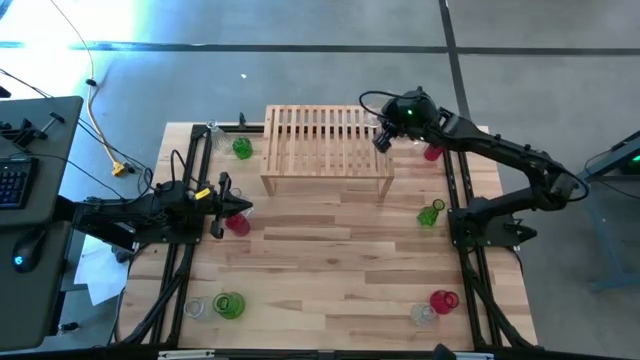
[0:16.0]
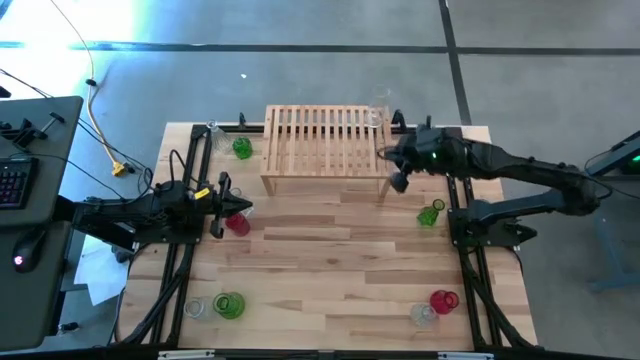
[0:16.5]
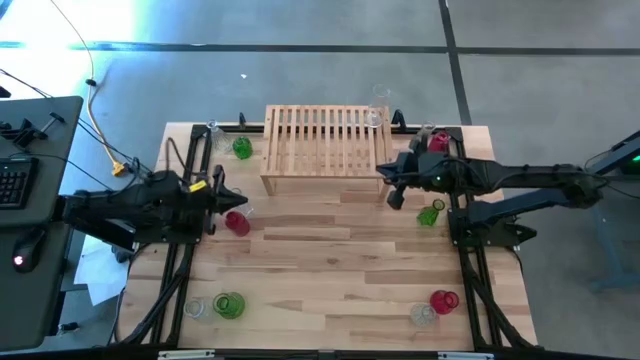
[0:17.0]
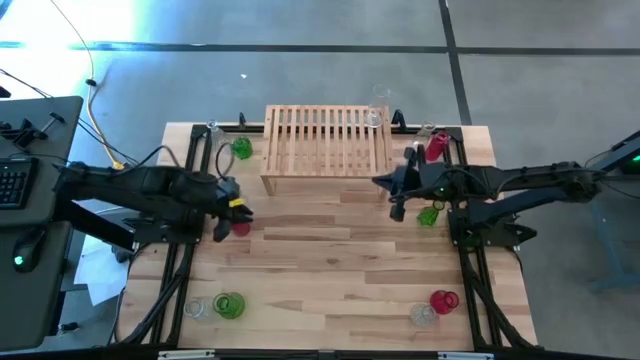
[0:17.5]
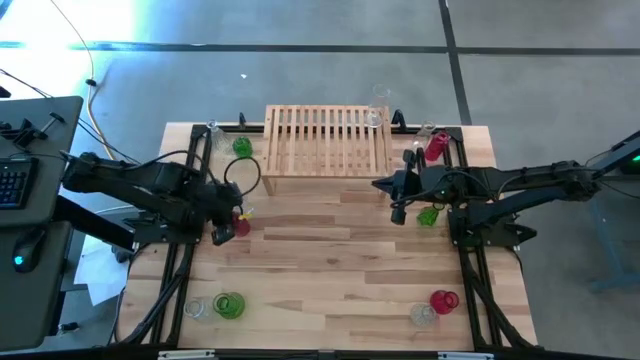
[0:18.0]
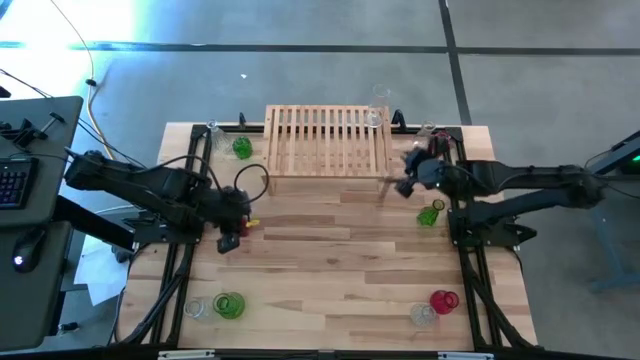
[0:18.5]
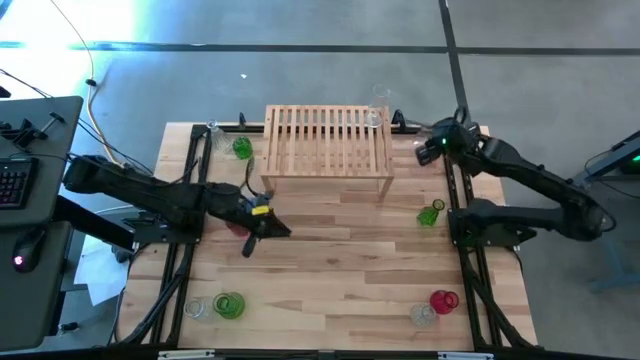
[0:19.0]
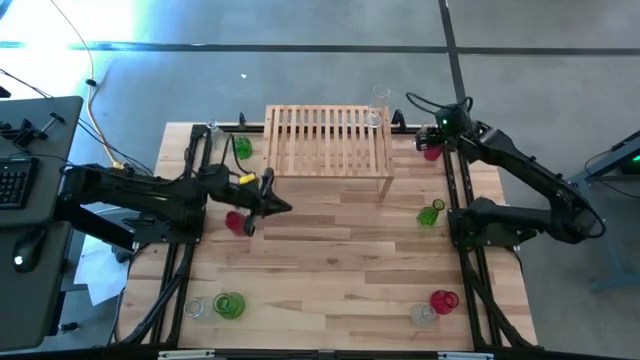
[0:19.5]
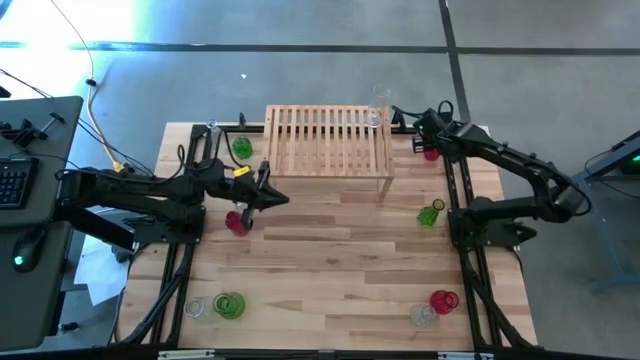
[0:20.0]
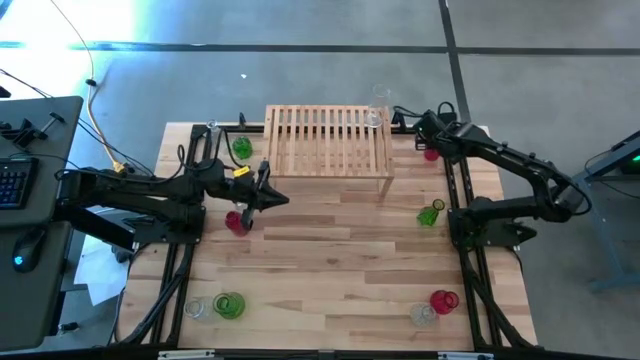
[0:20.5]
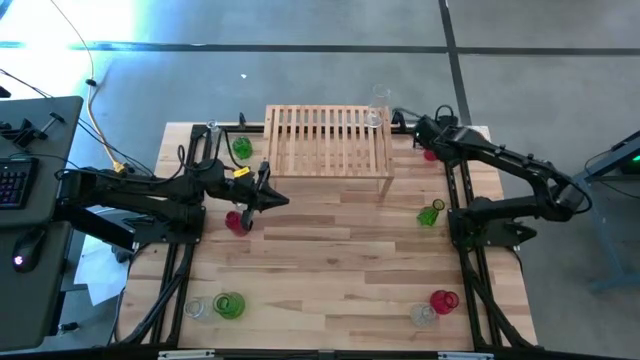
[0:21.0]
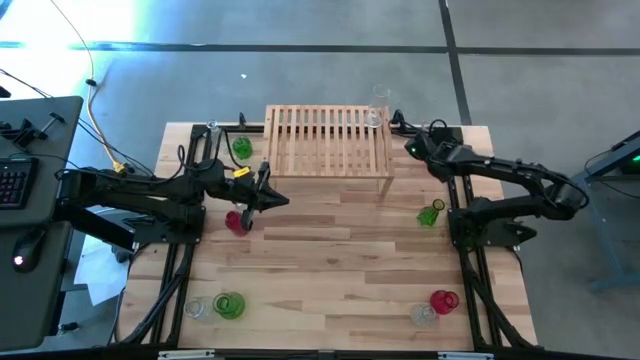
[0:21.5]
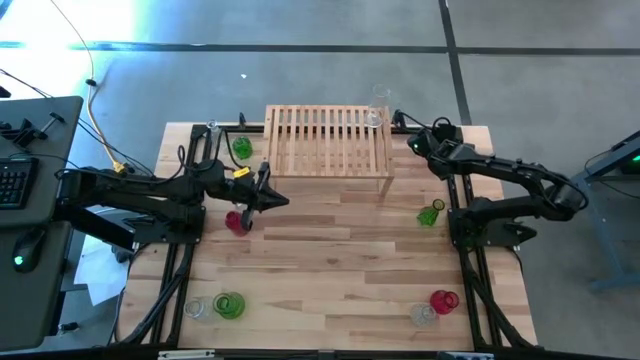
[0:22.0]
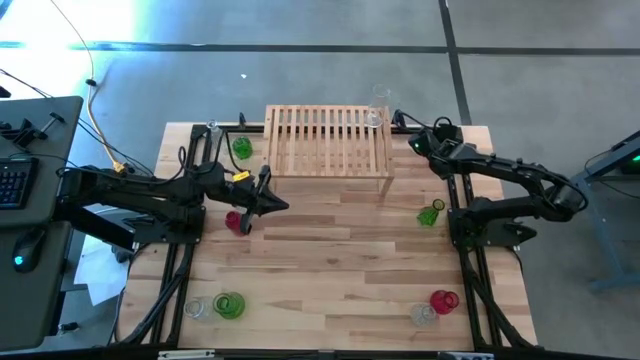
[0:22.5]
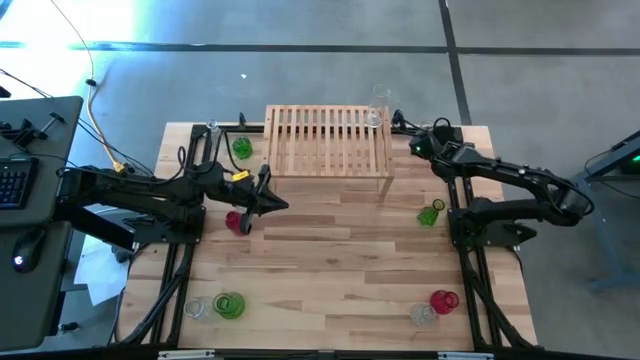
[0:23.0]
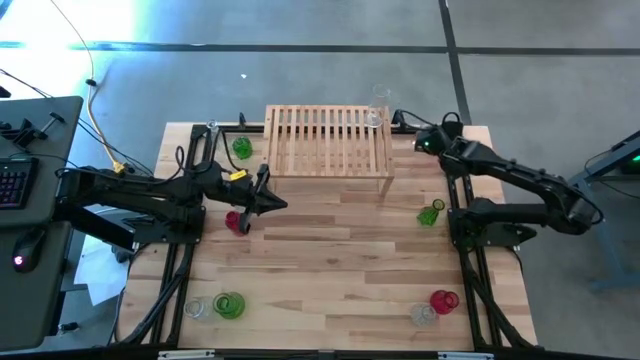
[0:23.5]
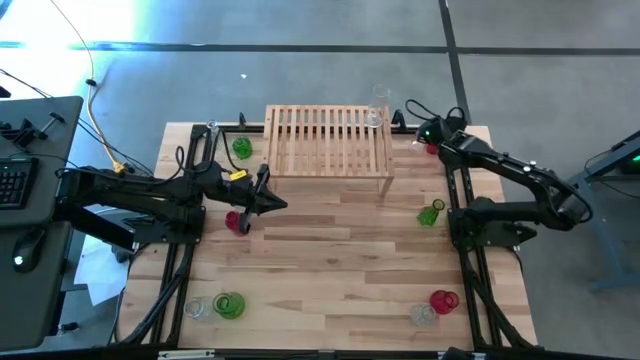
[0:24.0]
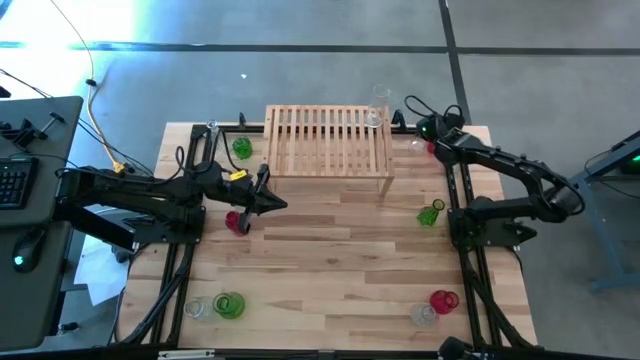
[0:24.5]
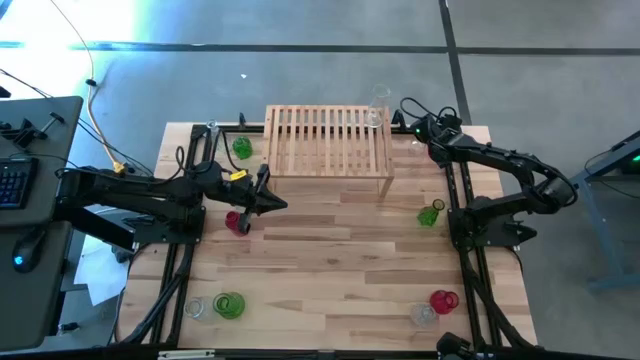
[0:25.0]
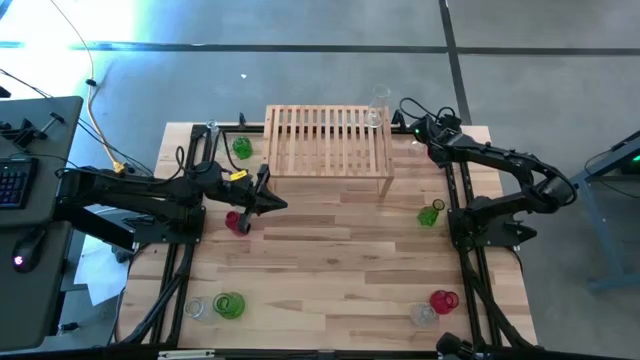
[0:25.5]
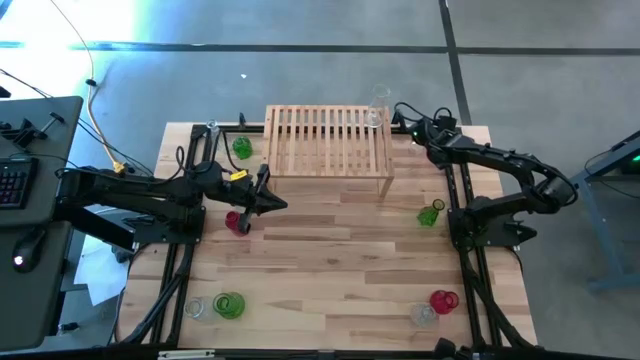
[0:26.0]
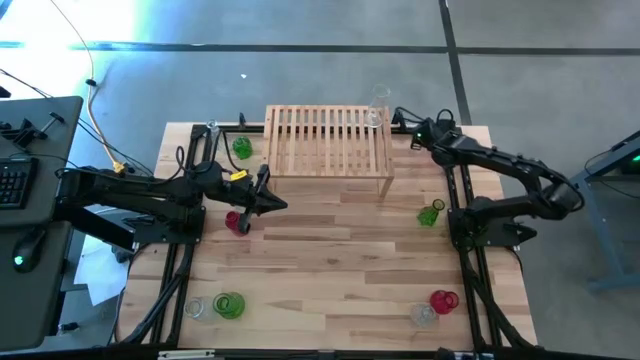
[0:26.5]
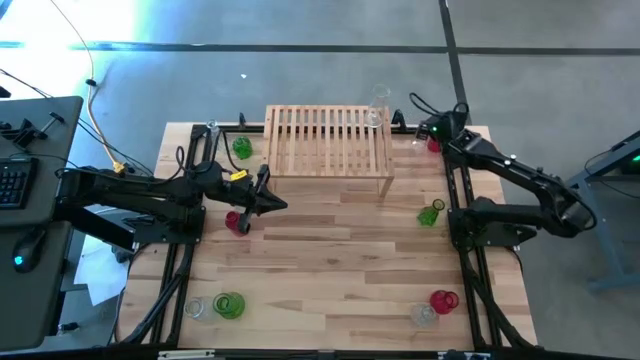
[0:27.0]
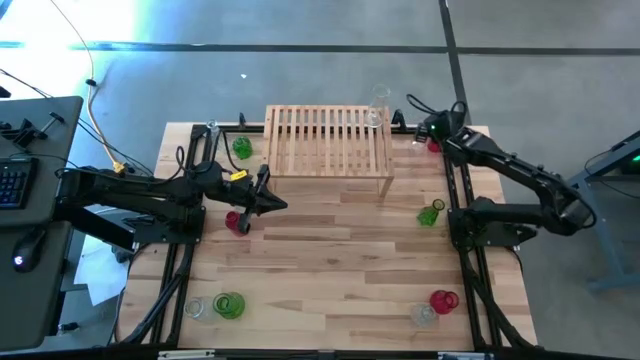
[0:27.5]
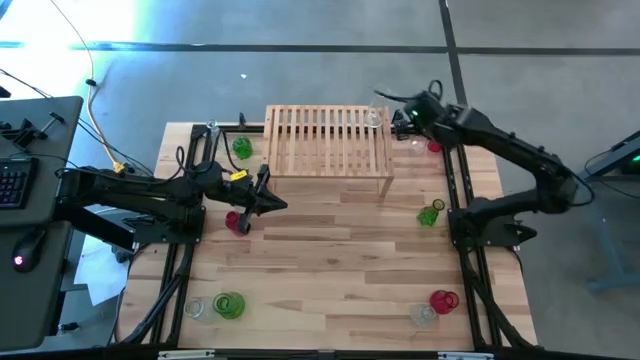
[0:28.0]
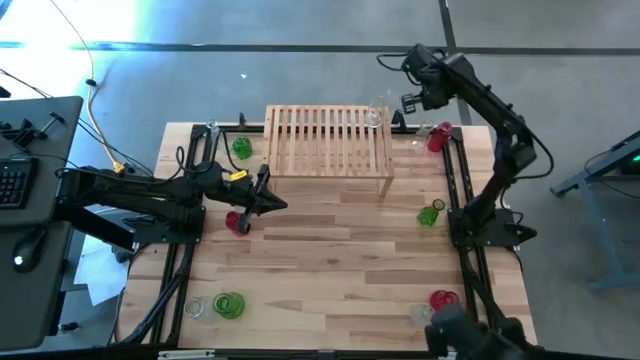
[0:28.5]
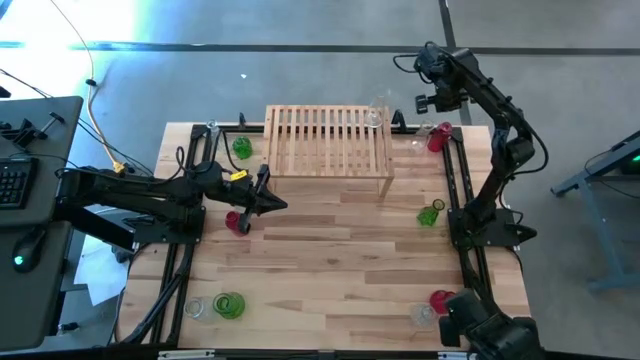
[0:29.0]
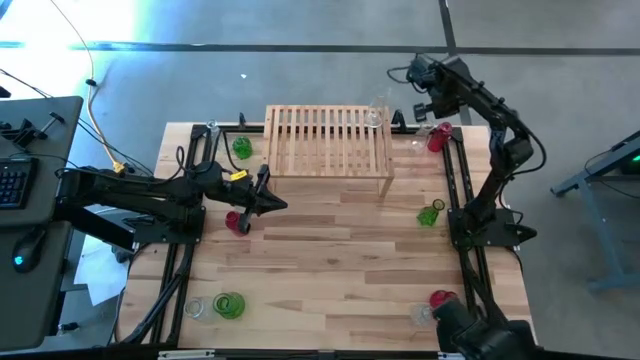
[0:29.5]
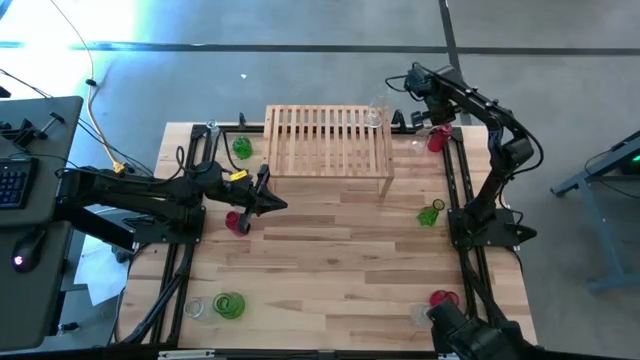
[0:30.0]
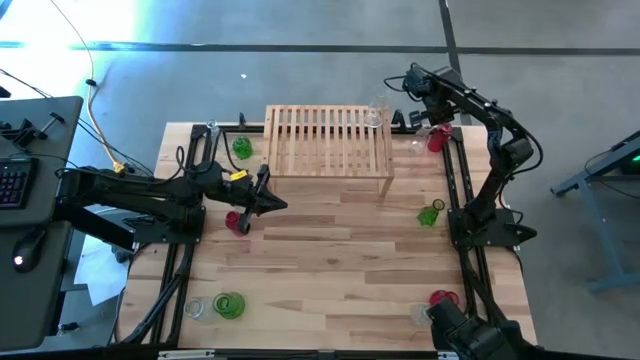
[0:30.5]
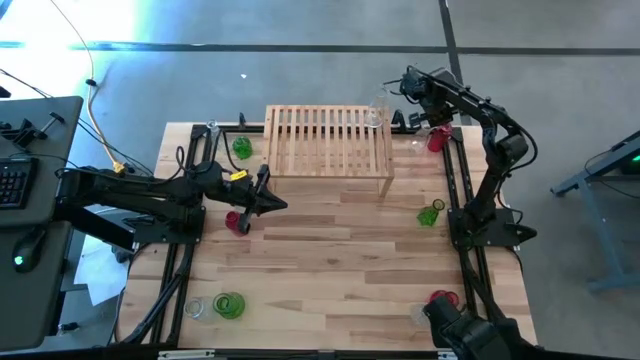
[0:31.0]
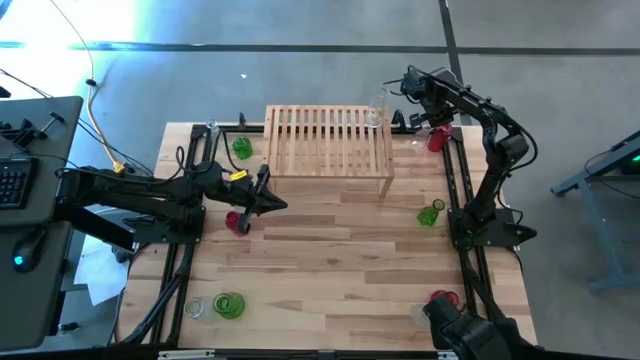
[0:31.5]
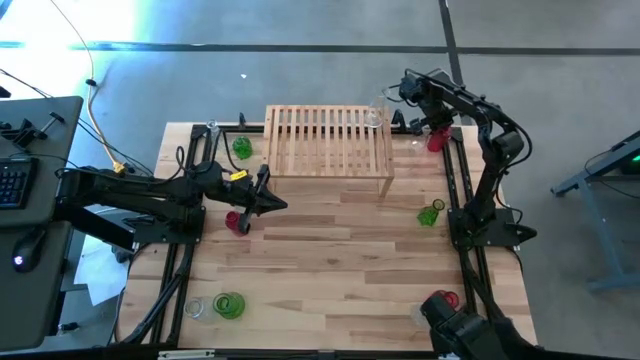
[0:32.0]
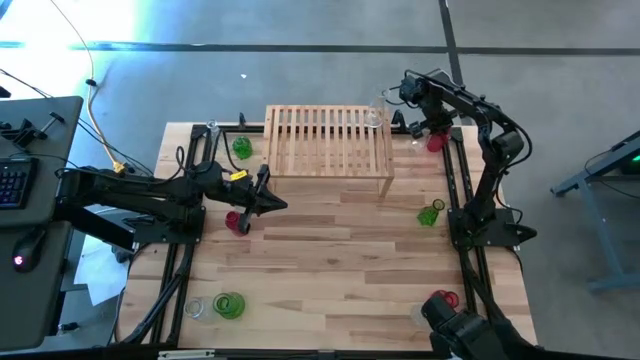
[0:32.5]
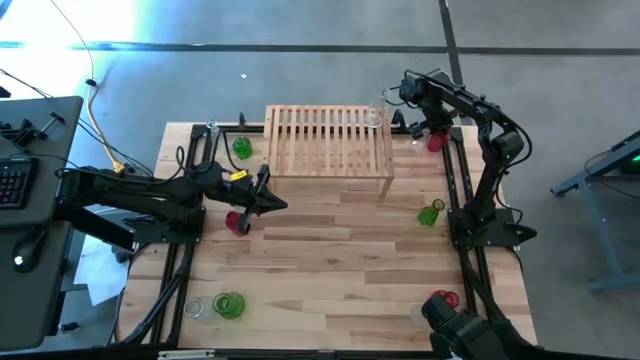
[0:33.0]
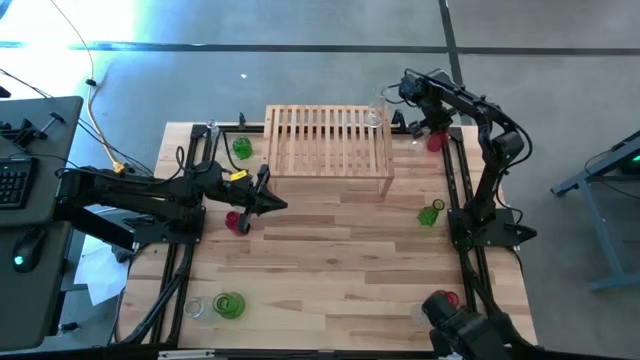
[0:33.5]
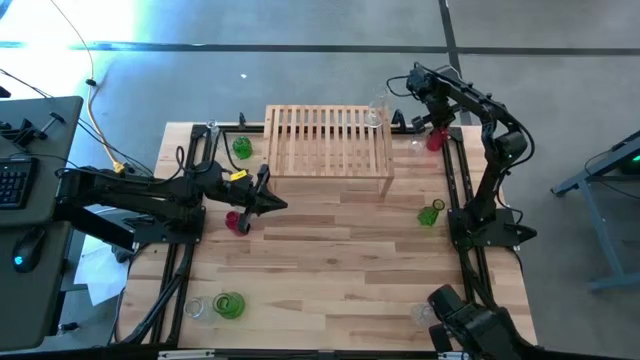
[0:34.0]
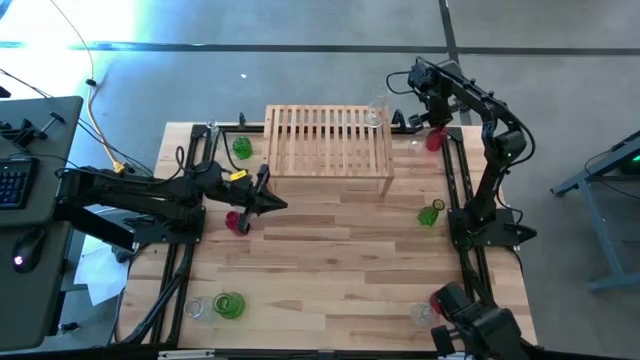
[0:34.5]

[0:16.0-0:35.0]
Task: sort vases onto shelf
Put the red vase on the shelf

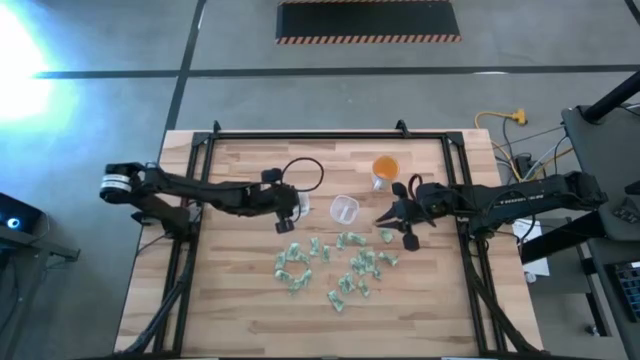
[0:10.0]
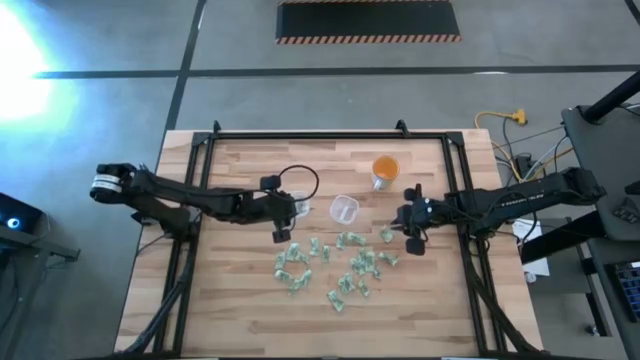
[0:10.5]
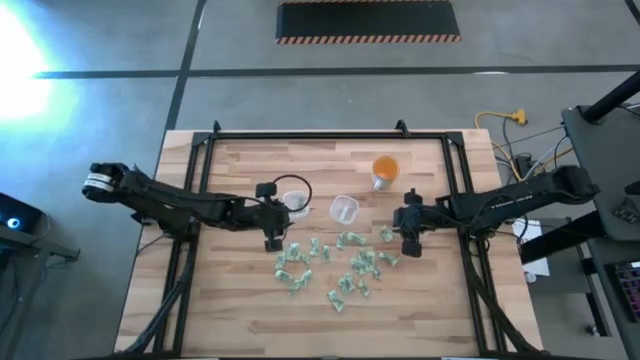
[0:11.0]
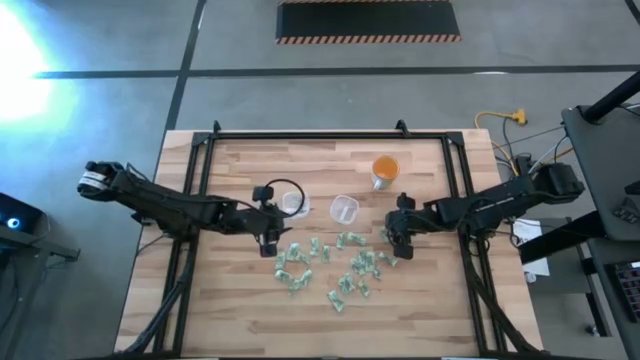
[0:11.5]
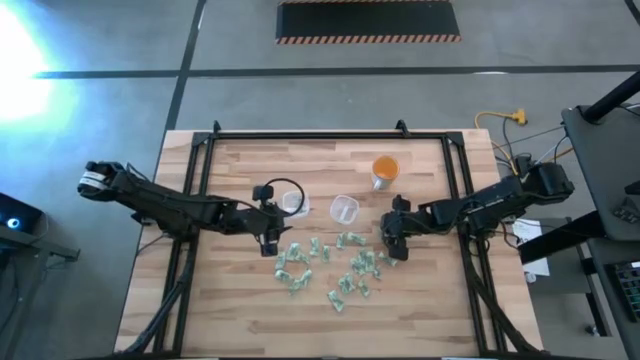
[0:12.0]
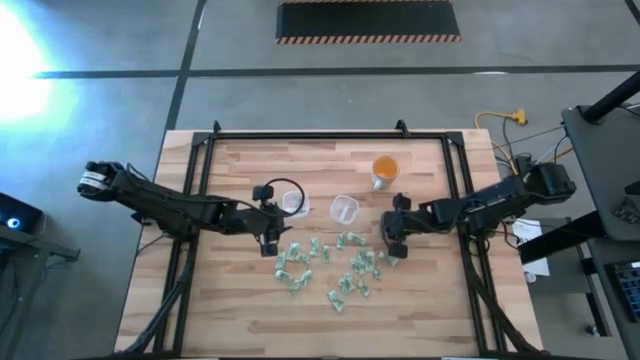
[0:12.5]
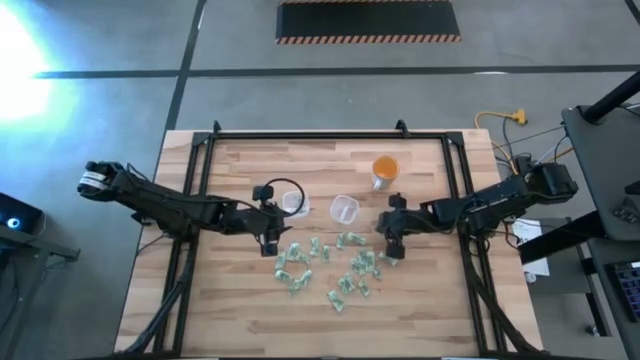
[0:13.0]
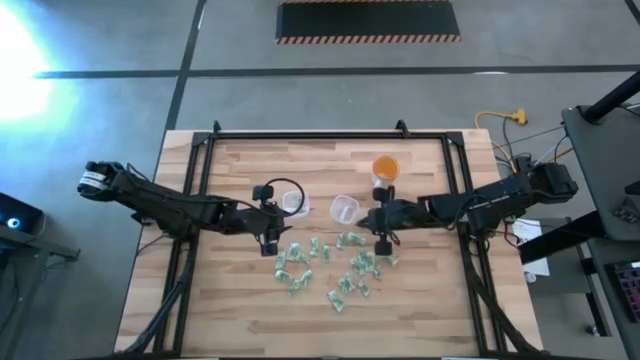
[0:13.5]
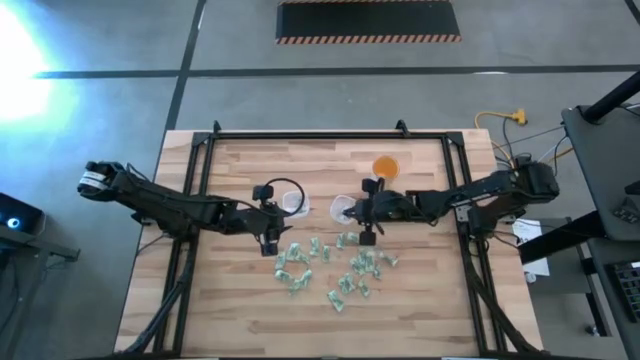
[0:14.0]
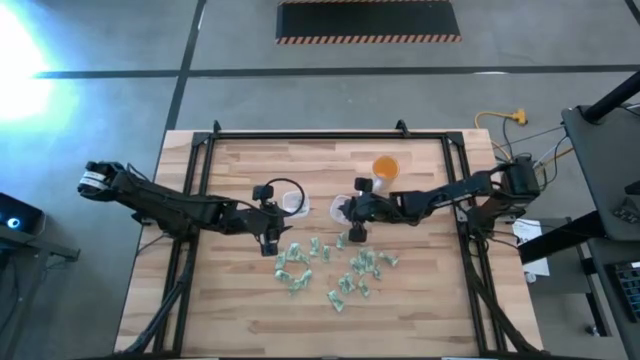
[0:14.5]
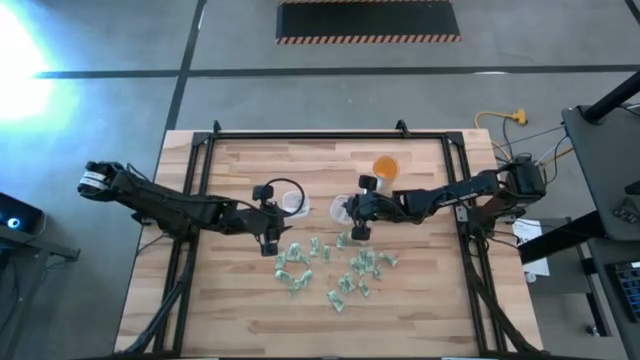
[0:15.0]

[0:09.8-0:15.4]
Task: Pick and place items into bin
Put the white stevia packet into the right transparent bin
